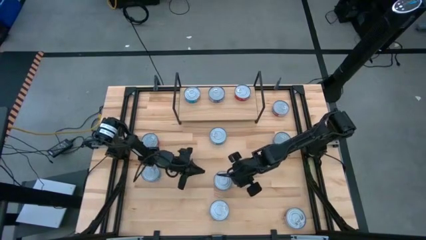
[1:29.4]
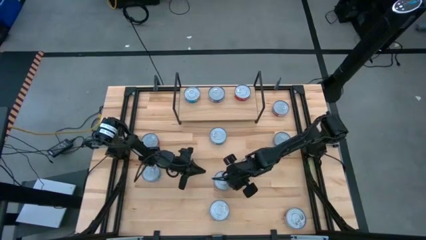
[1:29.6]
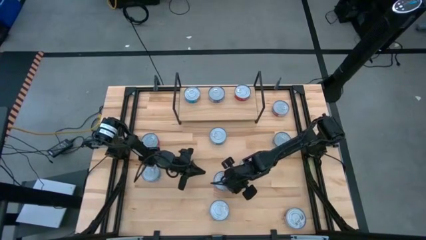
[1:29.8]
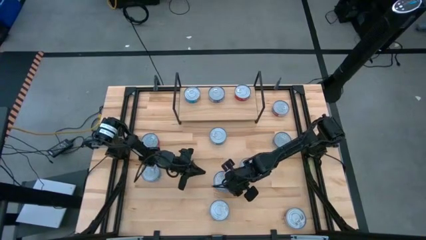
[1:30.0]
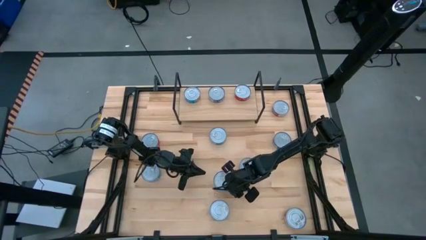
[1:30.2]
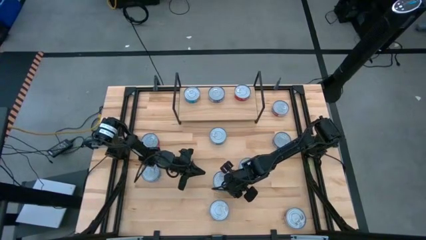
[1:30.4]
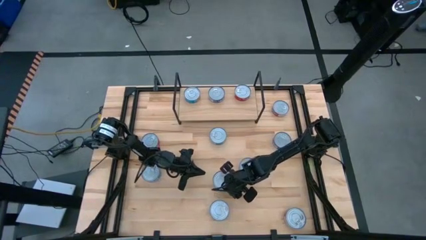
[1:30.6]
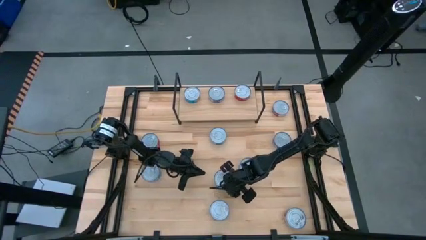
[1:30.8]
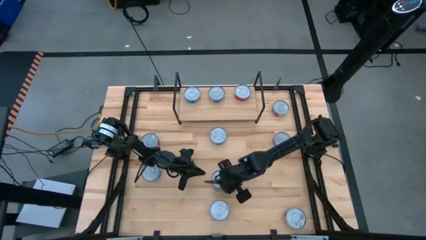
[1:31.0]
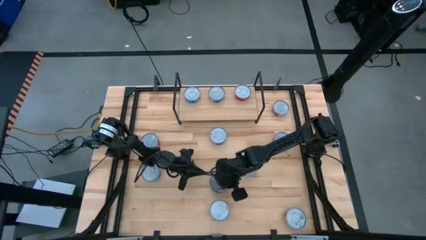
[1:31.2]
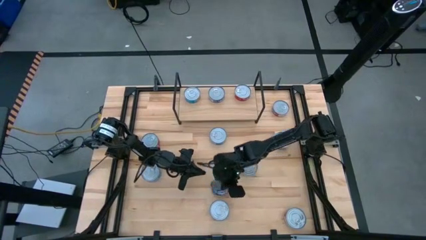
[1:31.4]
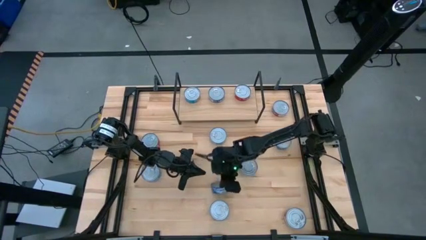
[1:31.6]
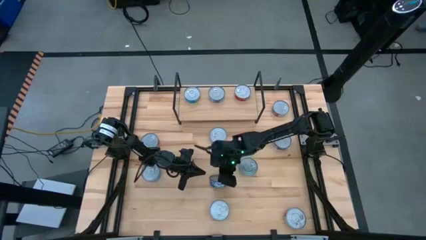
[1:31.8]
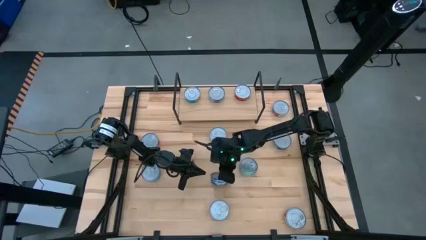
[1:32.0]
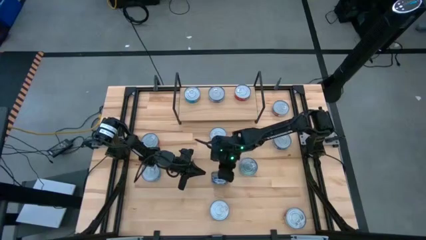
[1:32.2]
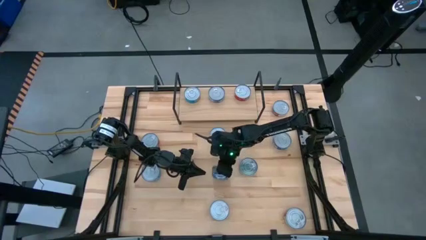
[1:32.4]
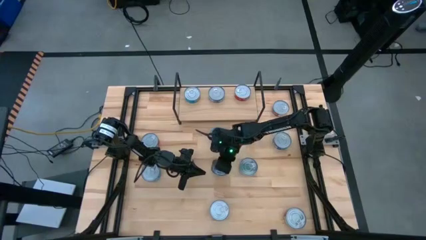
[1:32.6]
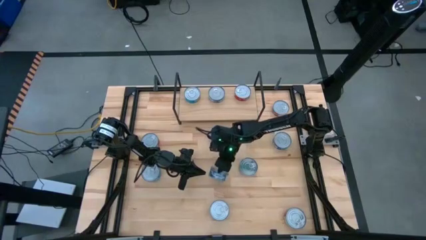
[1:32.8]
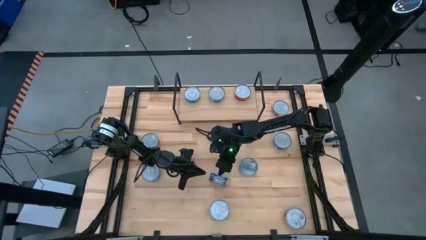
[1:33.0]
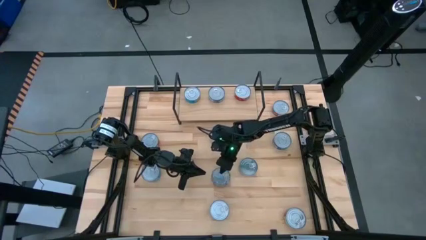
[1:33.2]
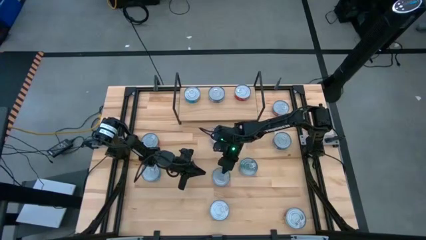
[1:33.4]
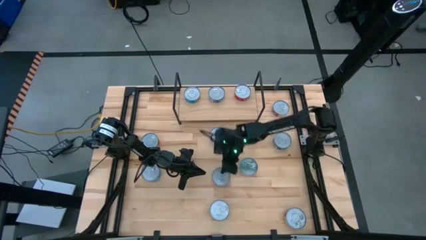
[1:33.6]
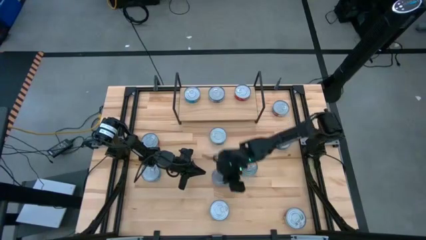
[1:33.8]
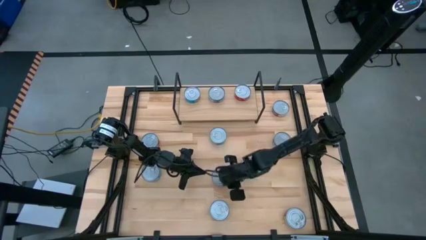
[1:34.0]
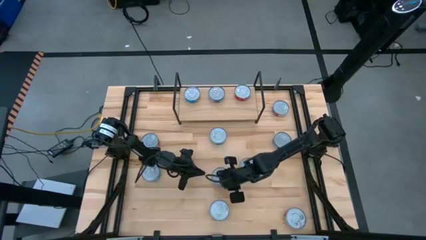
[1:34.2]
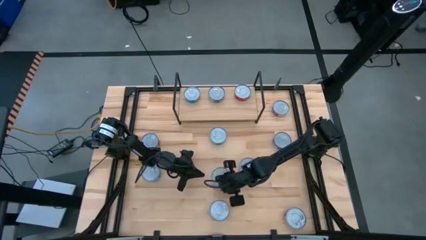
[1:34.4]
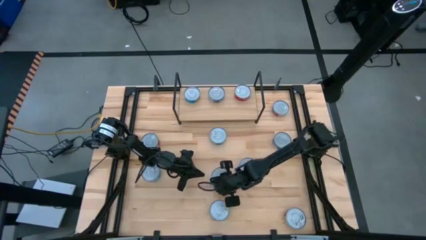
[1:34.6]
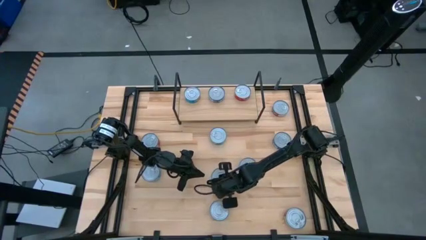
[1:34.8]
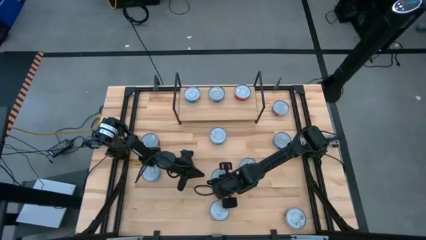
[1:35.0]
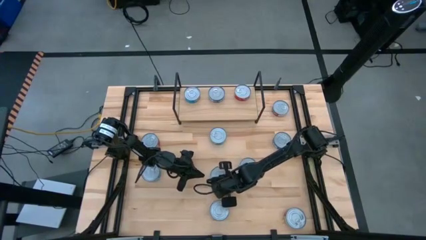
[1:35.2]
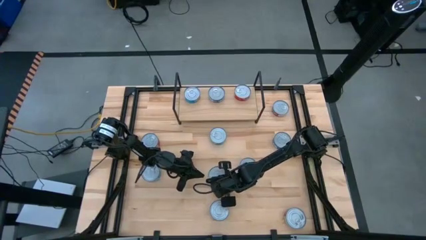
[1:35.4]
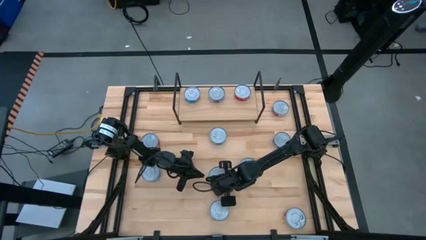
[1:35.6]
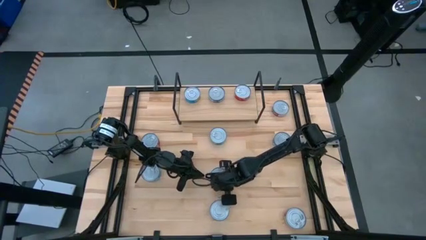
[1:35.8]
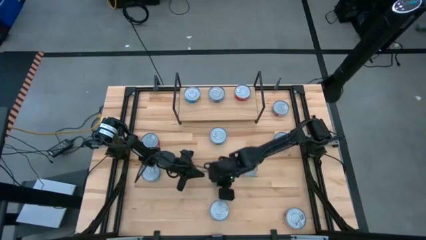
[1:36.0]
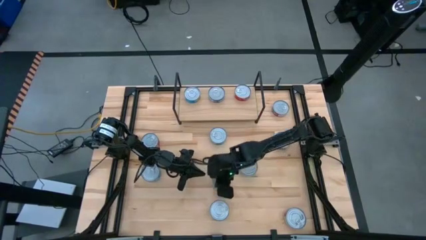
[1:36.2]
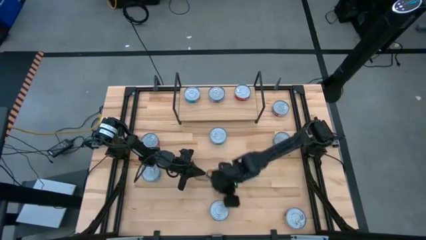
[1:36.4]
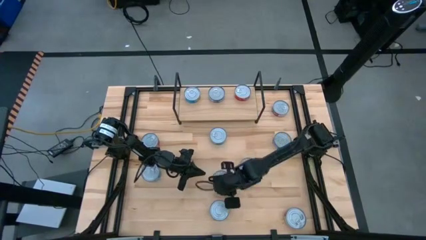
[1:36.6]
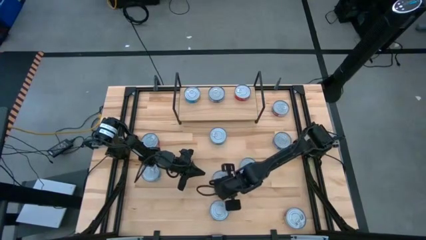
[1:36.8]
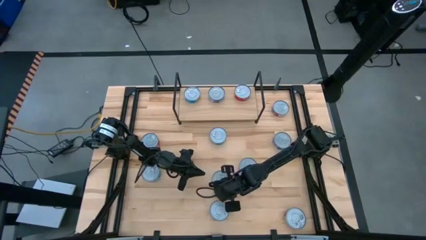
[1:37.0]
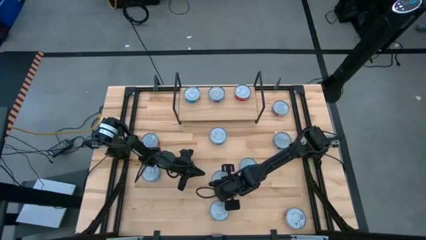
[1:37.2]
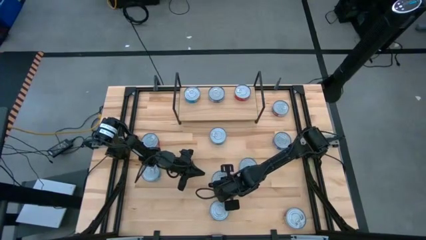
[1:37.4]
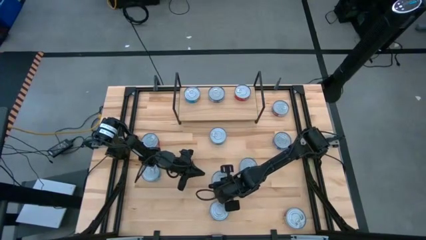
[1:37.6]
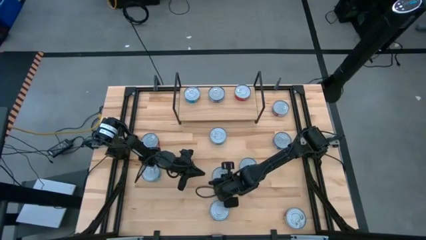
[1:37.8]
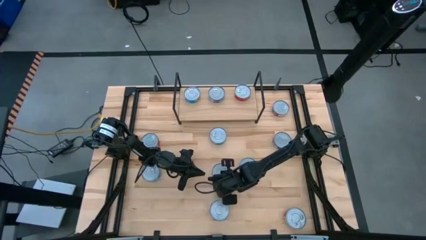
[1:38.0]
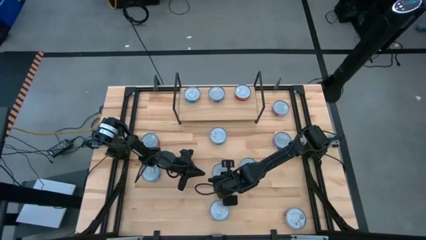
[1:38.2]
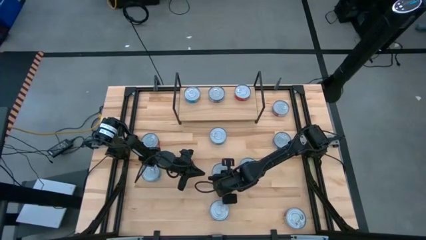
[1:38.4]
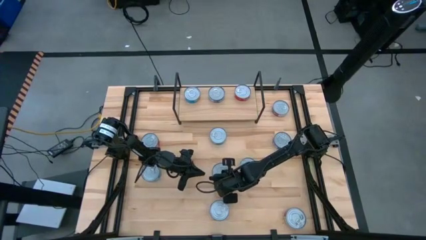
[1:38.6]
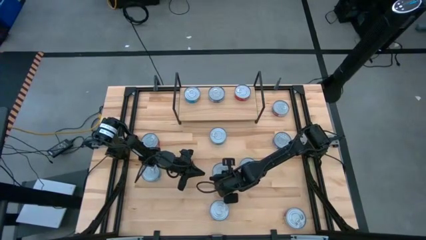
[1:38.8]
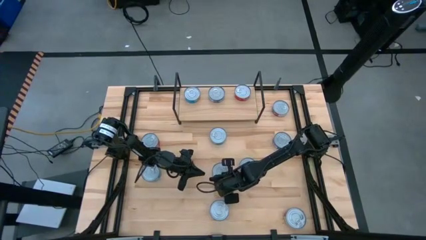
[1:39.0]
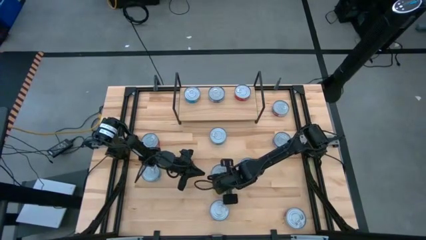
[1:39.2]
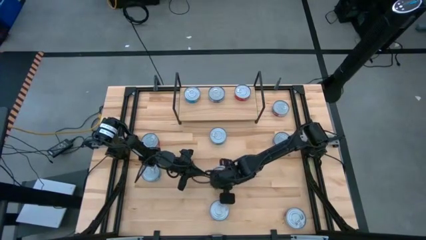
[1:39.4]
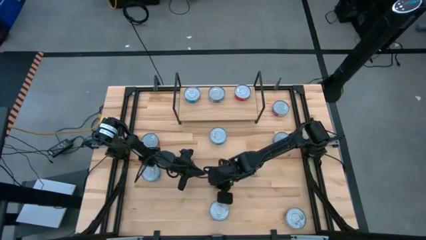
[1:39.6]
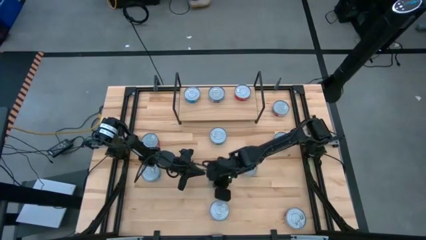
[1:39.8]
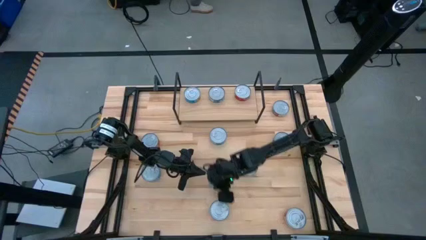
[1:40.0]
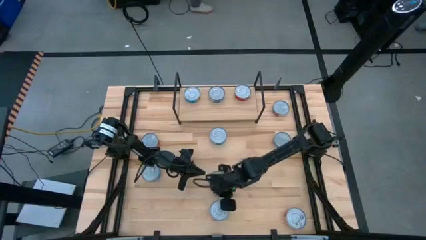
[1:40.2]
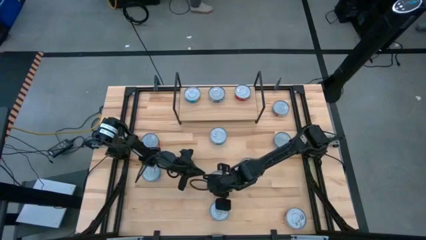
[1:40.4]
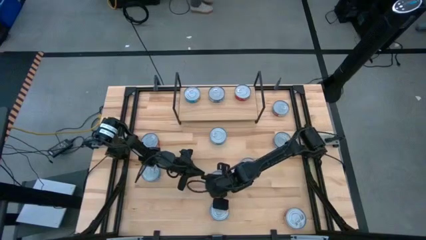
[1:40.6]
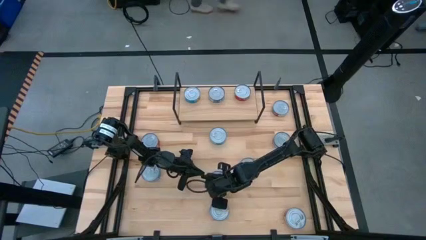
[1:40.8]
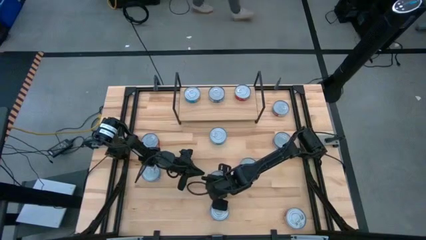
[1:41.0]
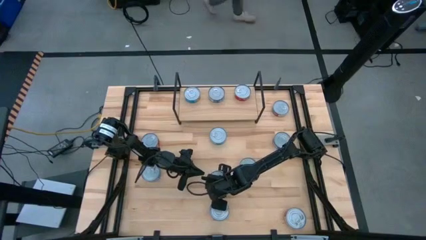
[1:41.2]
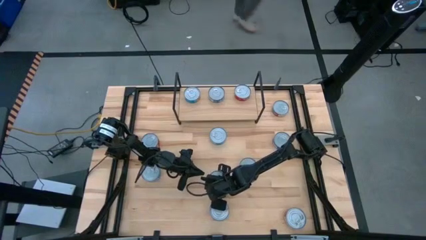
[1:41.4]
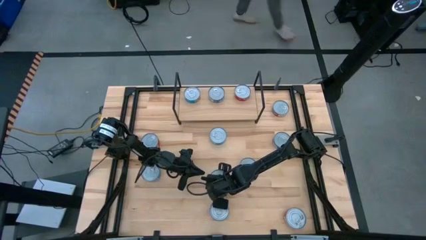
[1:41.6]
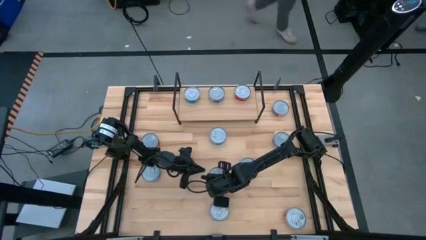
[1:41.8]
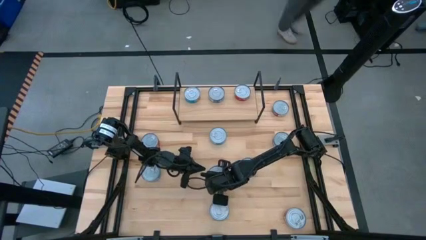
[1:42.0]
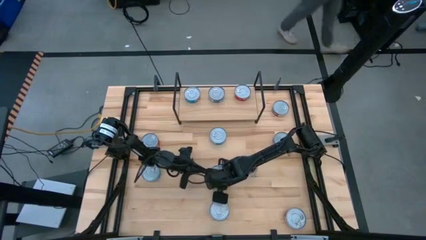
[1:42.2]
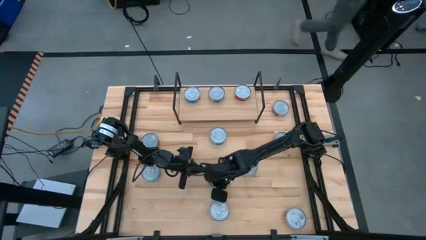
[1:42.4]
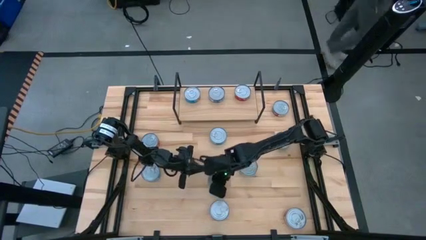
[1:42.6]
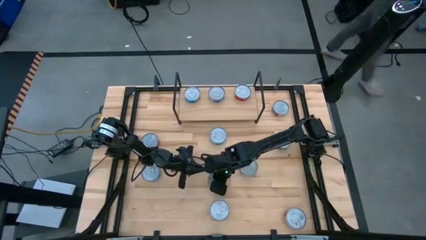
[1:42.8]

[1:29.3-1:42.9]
Task: Stack canned seafood by type on shelf
Put the center blue tuna can on the shelf

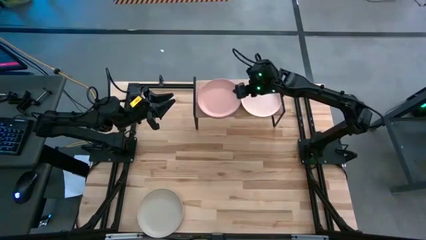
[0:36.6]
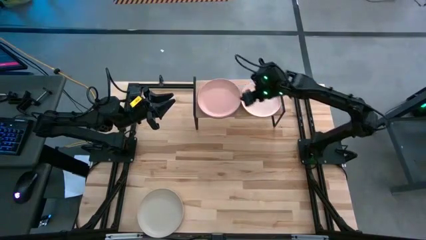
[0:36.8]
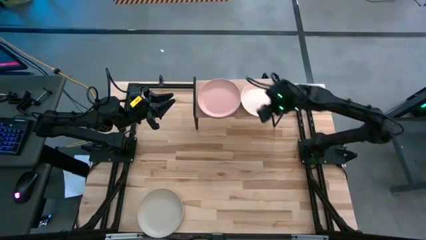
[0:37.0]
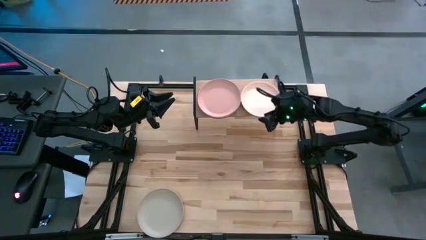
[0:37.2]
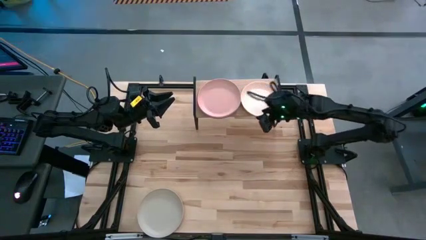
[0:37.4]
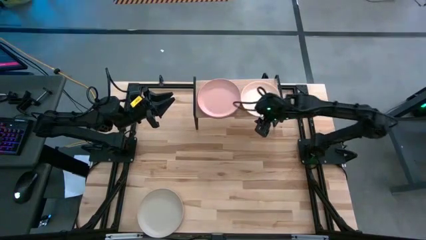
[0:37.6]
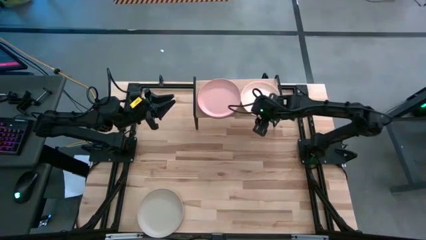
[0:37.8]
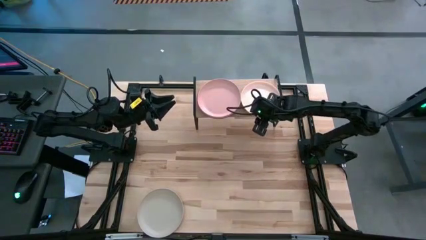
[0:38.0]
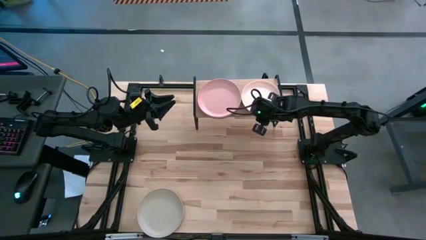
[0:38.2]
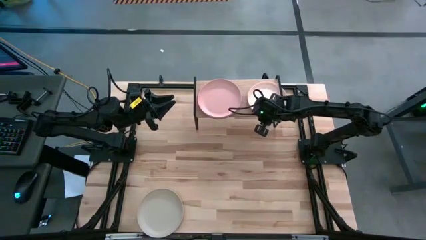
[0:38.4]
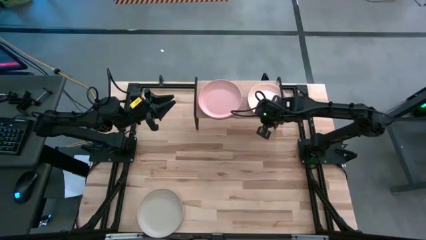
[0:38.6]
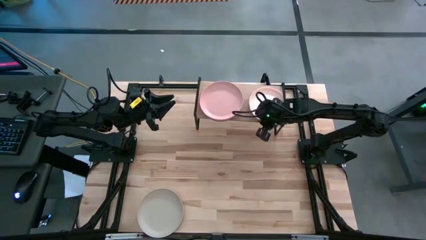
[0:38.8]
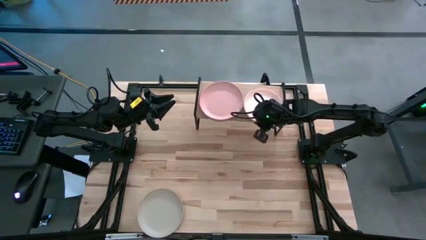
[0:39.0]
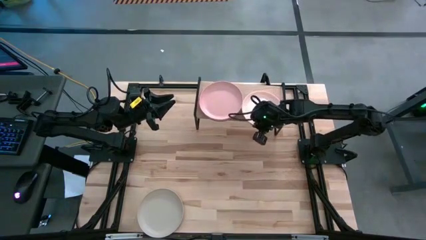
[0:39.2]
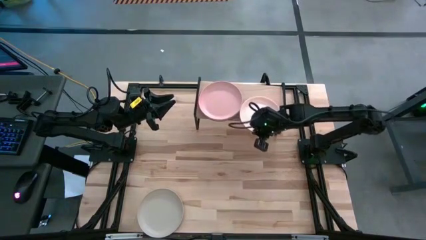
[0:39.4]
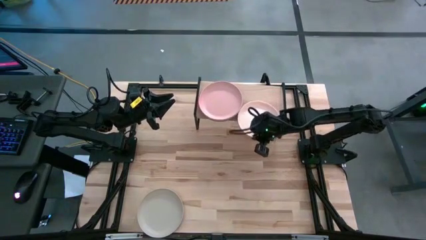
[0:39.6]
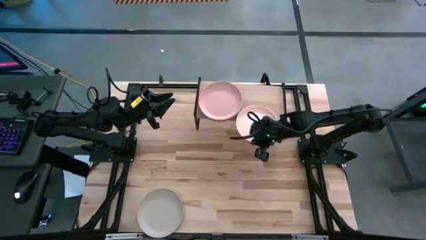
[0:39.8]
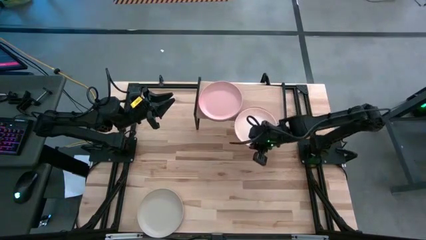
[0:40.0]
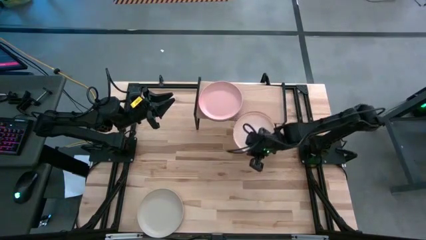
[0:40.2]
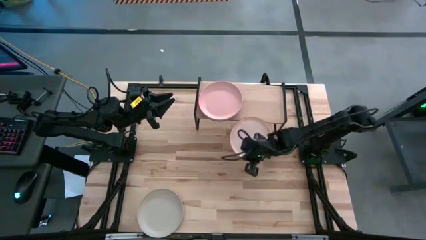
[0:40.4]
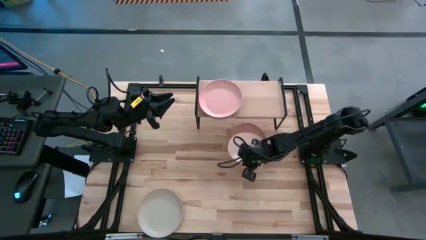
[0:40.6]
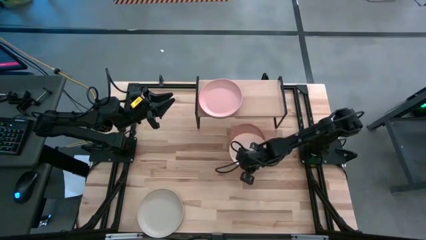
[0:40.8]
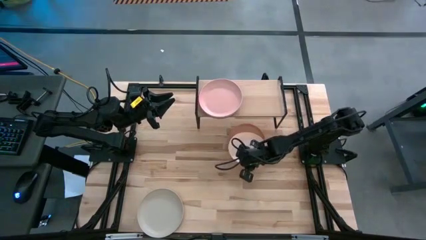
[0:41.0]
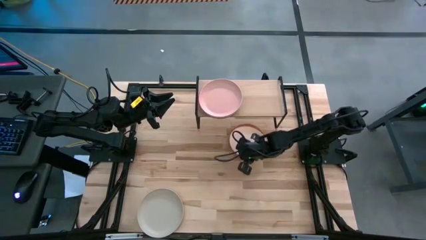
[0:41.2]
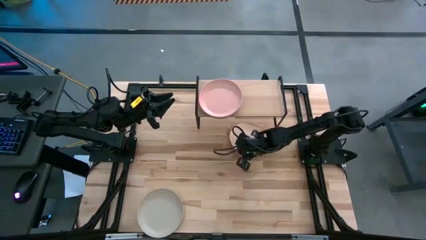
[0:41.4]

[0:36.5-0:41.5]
Task: Place and stack plates onto a shelf
Put the left white and light orange plate on center table
